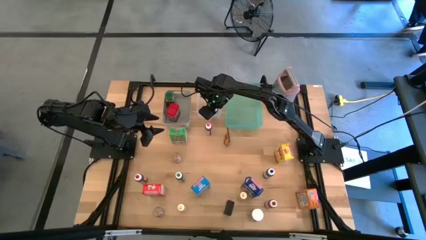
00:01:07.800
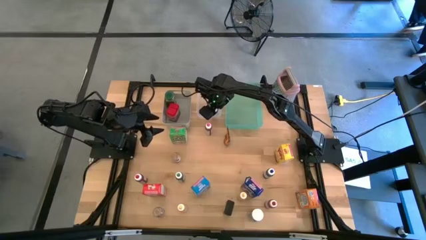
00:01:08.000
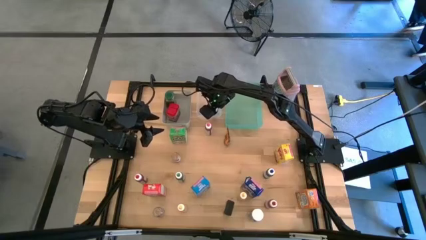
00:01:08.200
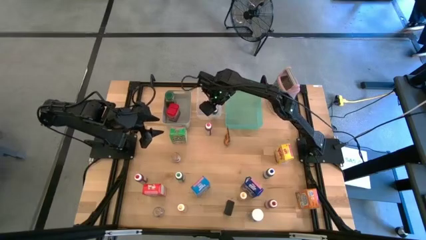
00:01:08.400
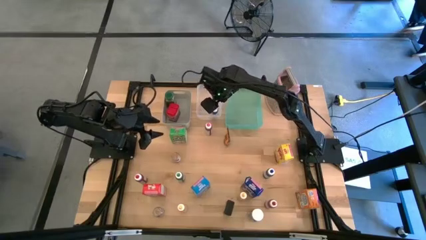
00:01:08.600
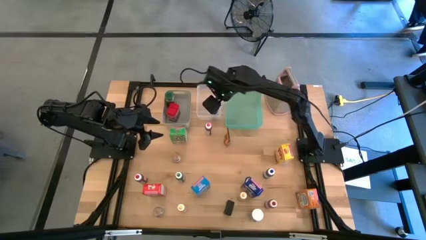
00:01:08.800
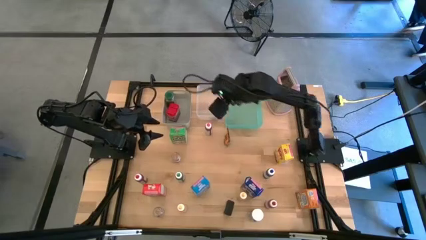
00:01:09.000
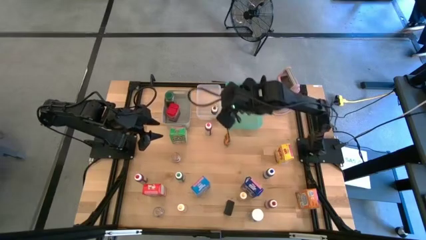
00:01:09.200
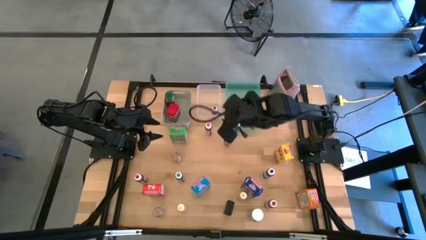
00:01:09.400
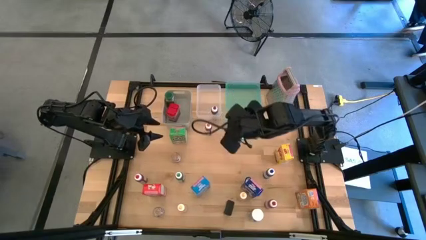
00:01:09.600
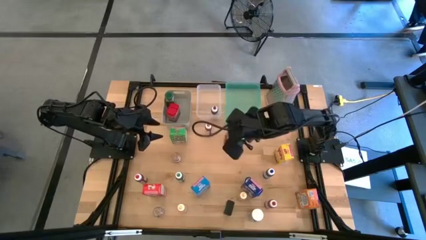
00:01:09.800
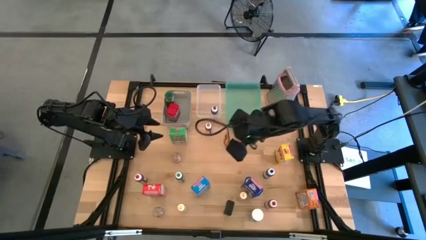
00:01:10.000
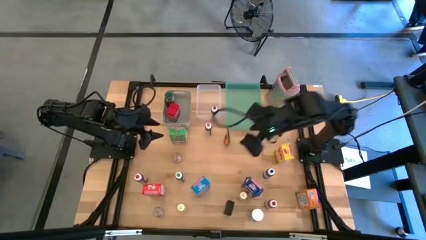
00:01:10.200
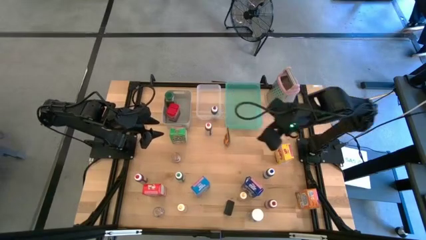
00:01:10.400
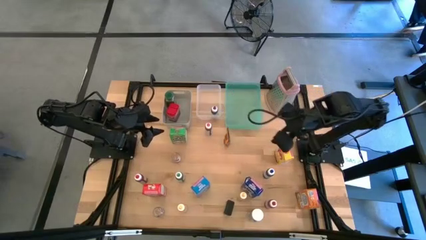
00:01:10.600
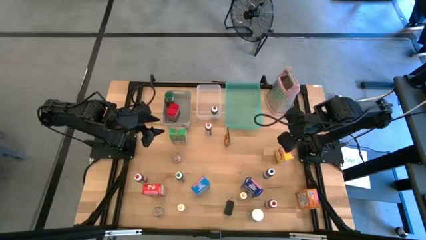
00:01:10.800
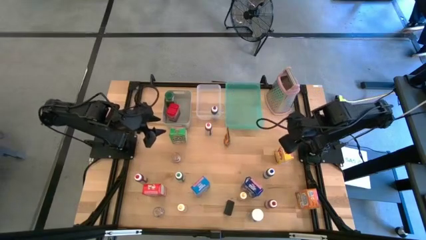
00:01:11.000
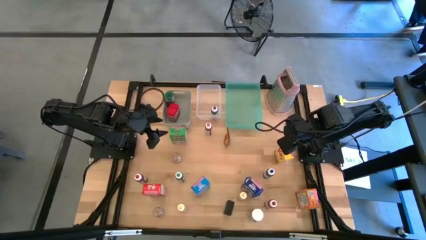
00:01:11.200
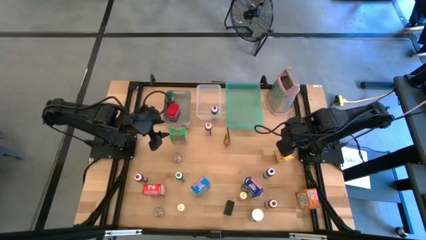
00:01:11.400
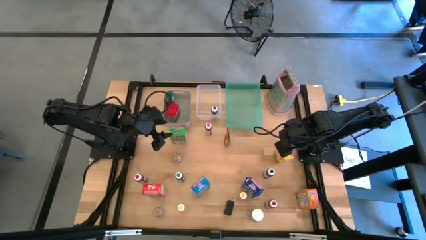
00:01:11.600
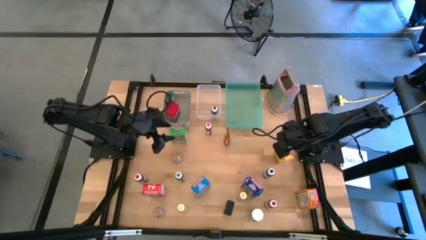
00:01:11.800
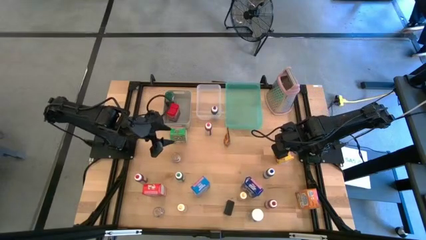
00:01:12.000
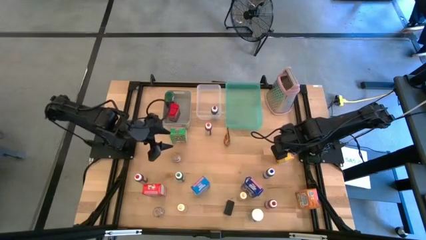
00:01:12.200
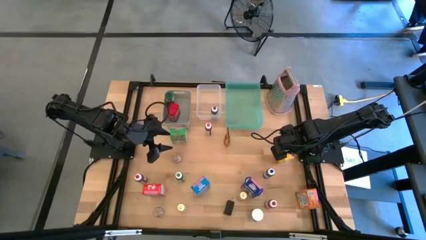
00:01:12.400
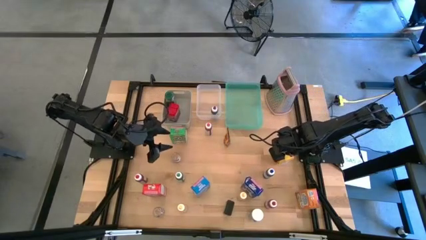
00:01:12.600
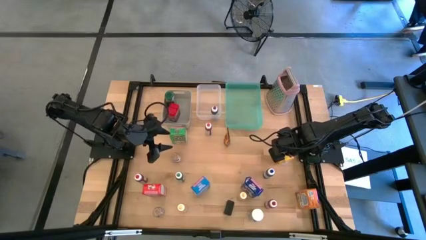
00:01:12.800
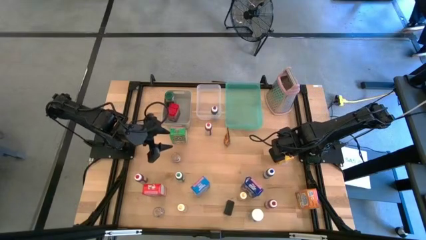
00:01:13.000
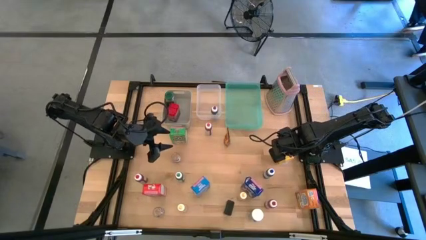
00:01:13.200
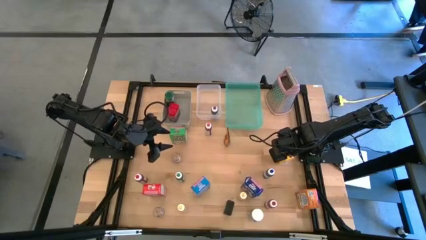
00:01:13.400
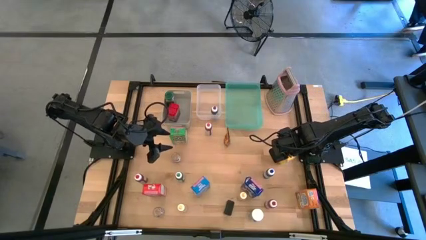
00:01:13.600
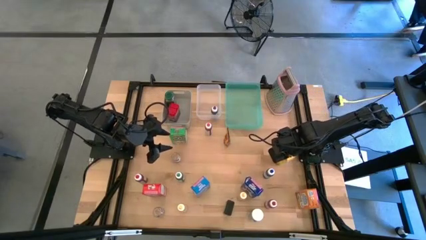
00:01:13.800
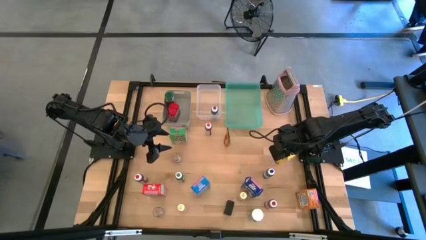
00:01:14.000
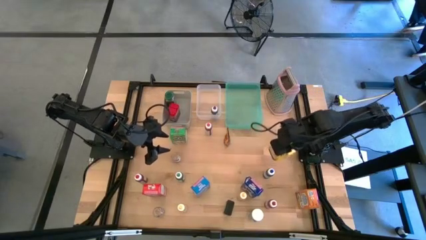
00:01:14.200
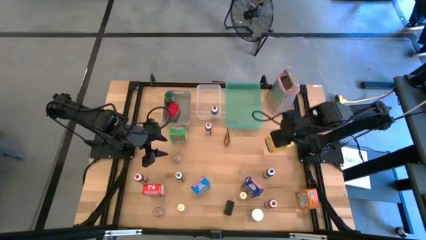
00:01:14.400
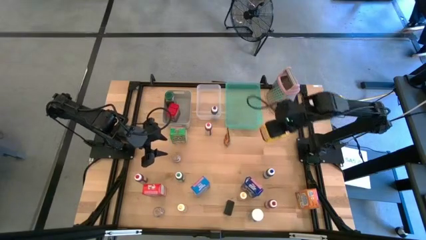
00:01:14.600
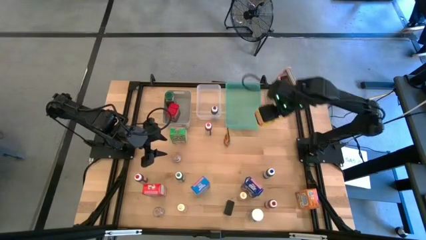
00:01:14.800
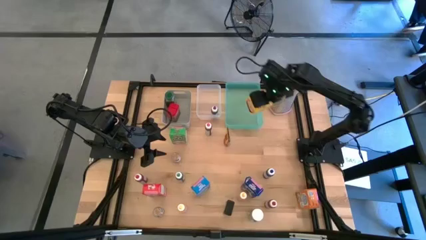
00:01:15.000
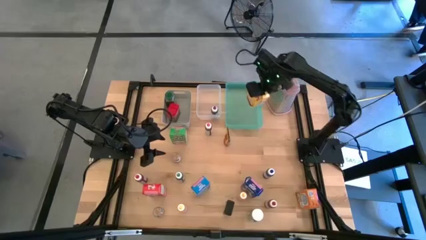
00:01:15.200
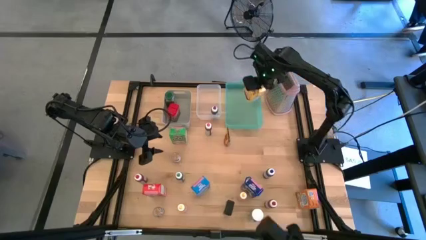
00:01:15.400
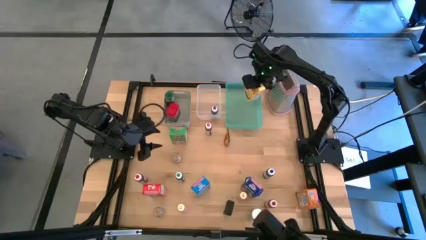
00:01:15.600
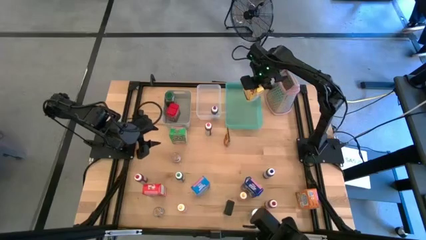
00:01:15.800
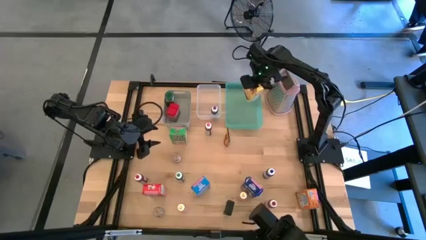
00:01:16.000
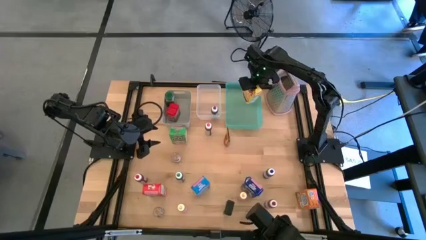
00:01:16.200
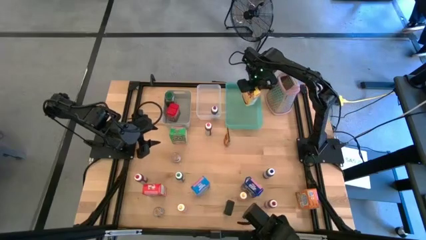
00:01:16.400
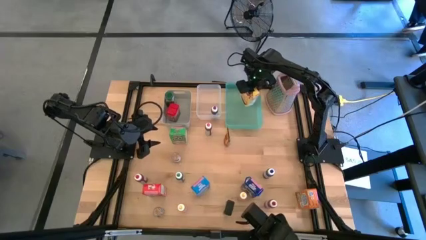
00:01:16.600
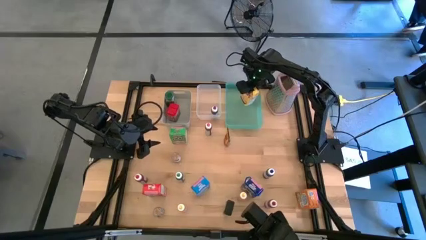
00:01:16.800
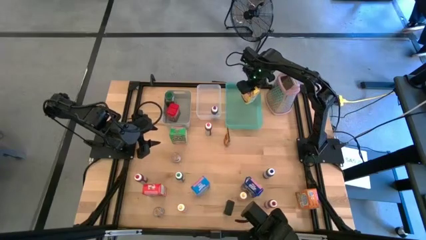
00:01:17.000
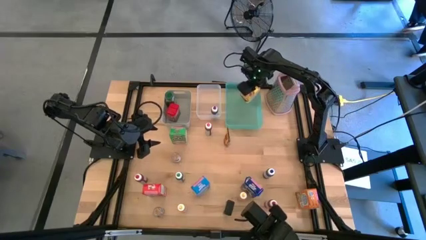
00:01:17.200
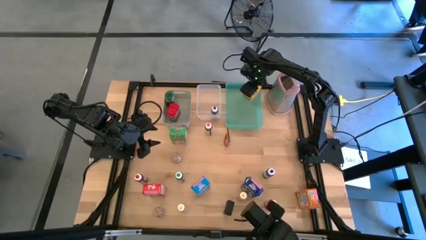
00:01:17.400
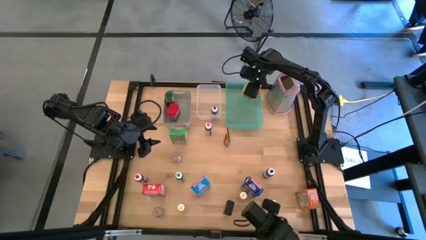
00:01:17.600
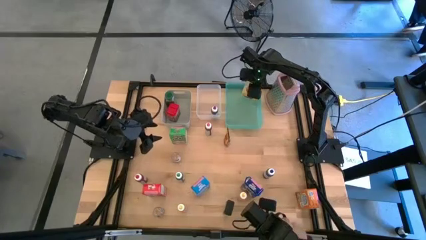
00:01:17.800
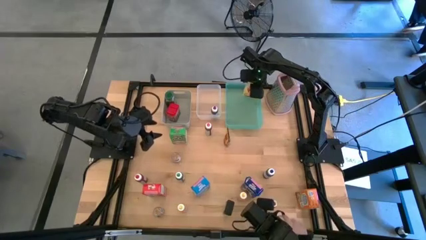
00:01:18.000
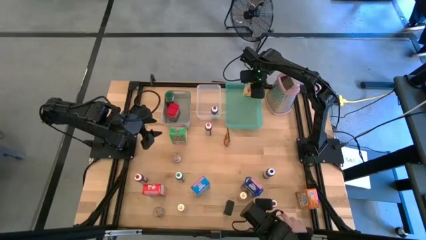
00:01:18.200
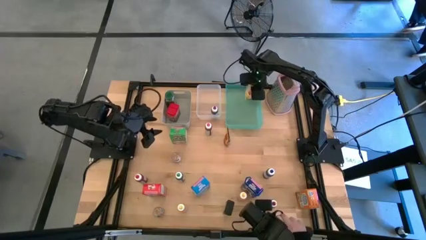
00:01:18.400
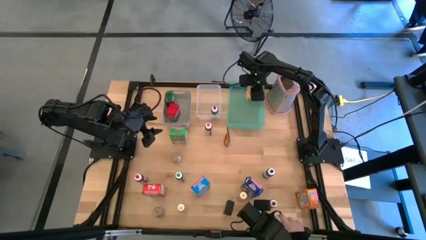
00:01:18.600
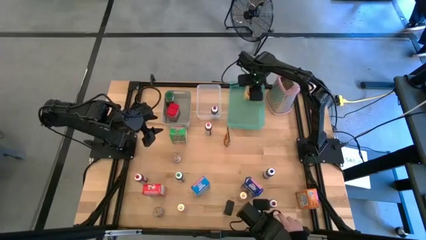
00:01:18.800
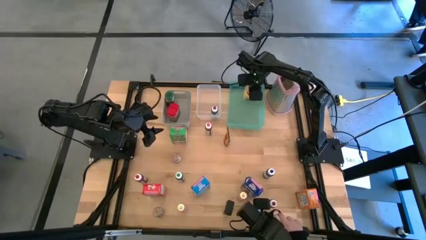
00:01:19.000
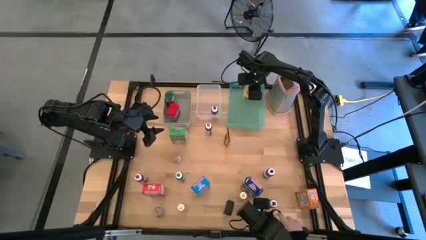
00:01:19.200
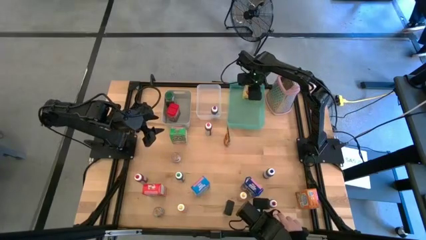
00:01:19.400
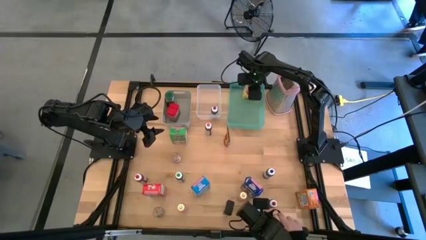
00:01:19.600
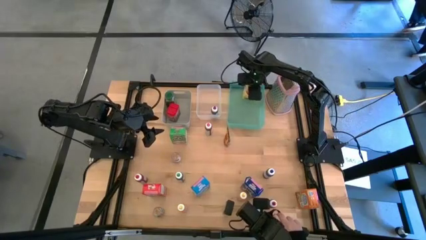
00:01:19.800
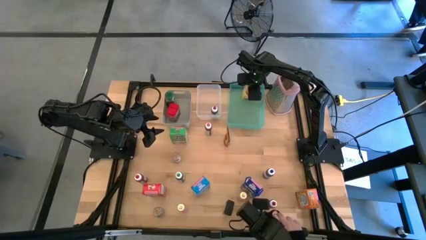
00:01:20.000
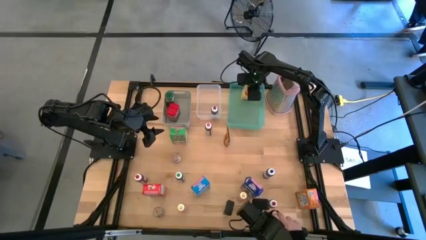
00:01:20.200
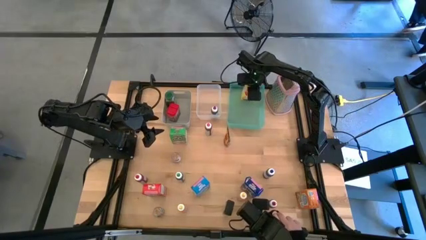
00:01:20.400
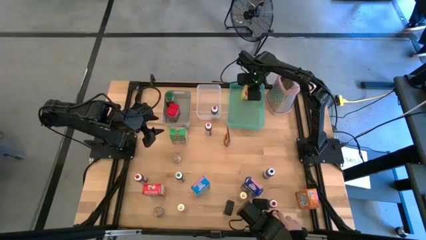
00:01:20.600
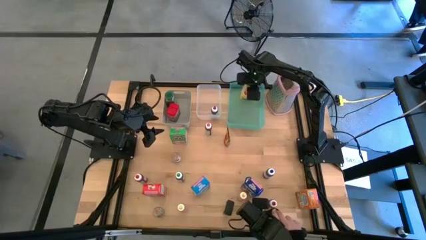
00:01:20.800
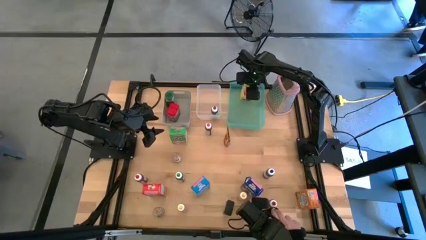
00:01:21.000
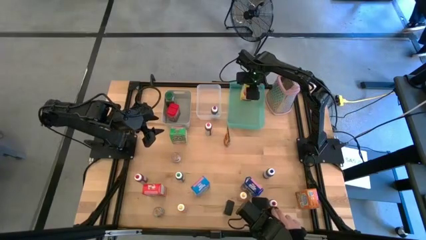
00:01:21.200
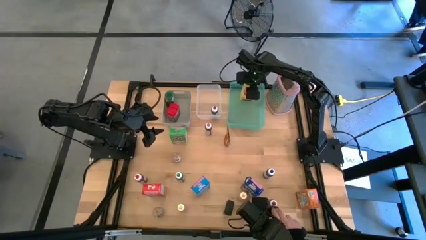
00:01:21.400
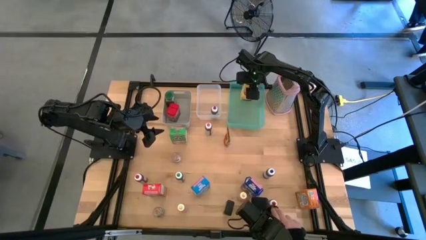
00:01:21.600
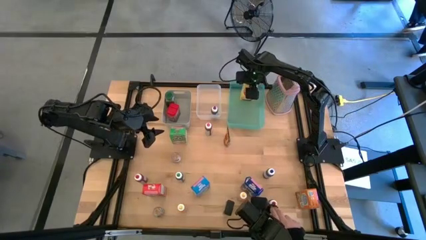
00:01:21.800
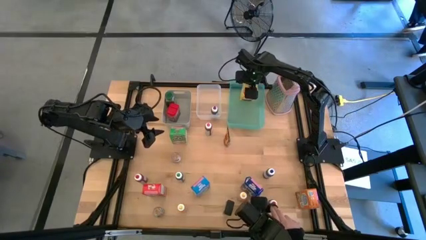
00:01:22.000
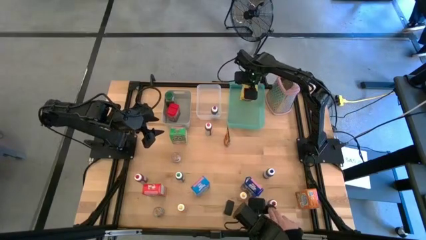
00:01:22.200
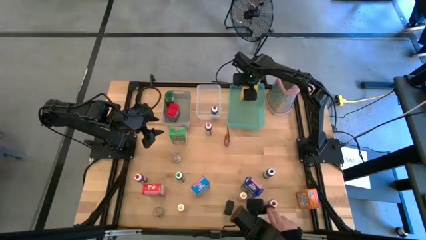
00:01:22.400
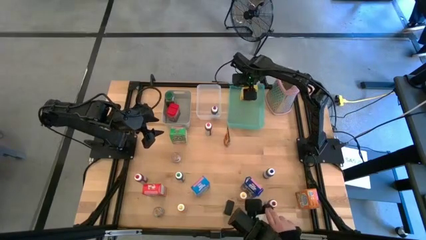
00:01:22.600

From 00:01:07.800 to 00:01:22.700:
Task: Pick & Place Kitchen Items
Put the yellow cereal box into the green bin
